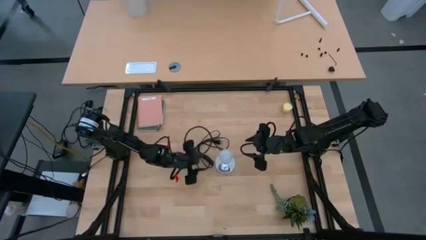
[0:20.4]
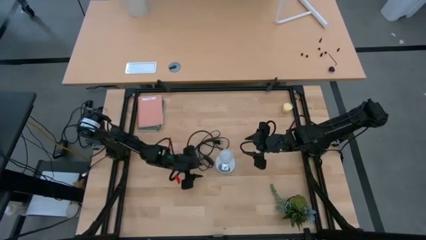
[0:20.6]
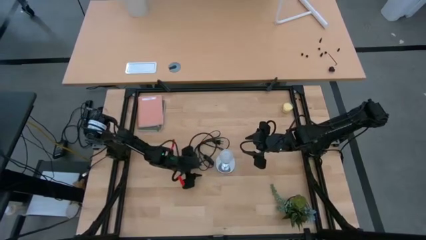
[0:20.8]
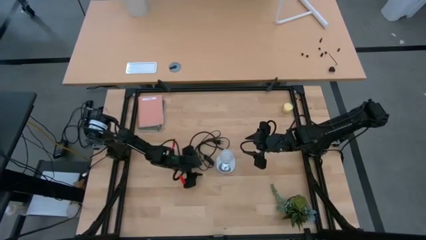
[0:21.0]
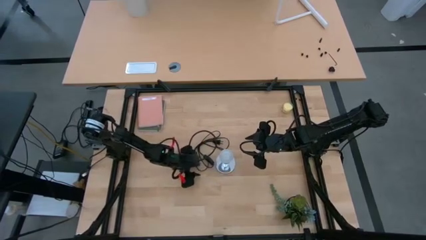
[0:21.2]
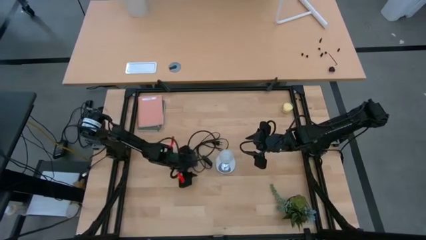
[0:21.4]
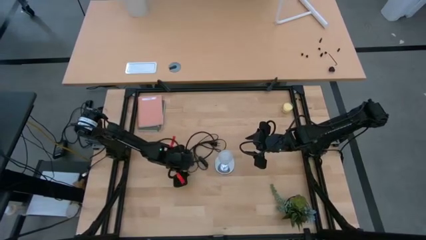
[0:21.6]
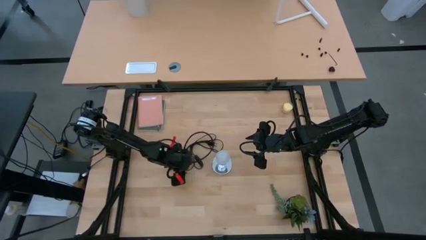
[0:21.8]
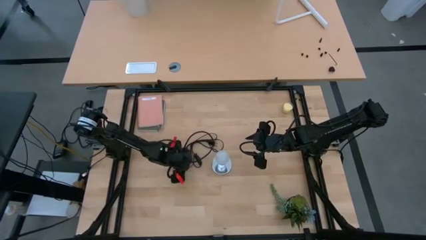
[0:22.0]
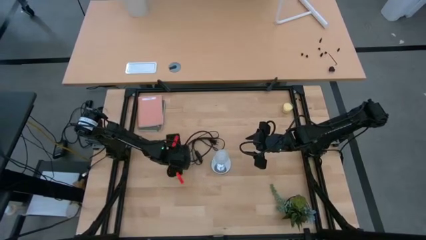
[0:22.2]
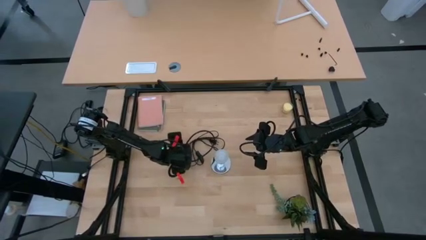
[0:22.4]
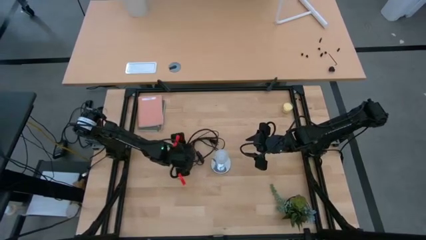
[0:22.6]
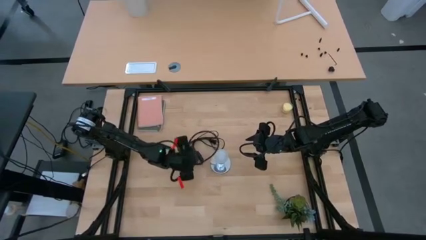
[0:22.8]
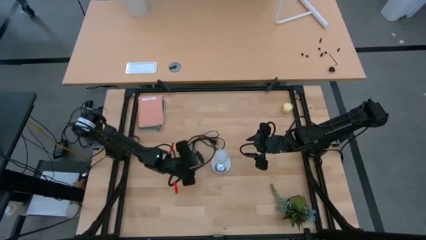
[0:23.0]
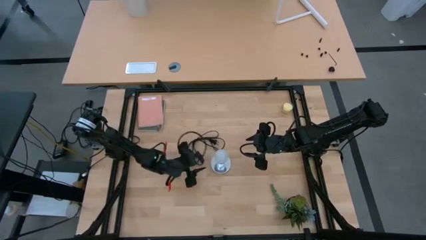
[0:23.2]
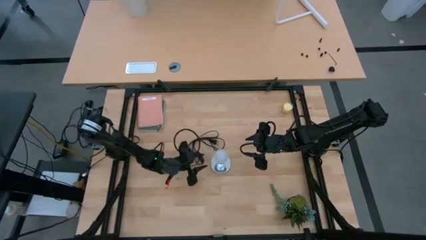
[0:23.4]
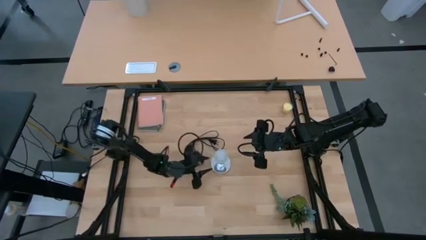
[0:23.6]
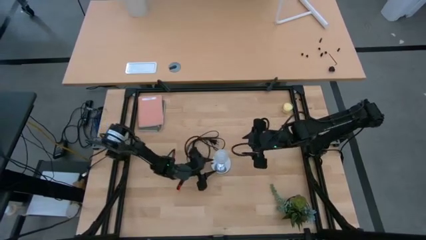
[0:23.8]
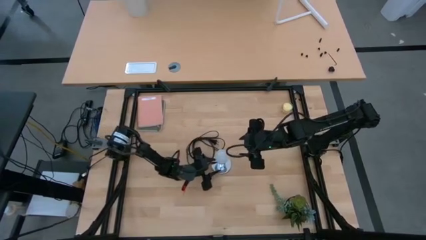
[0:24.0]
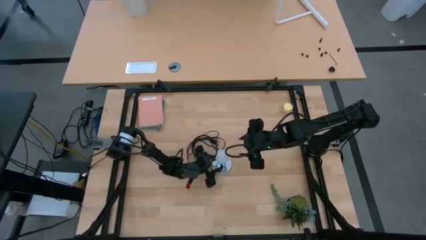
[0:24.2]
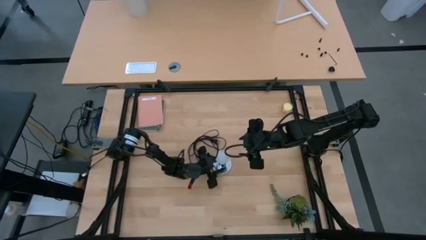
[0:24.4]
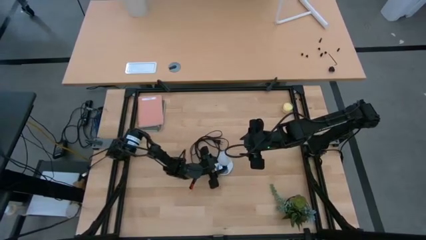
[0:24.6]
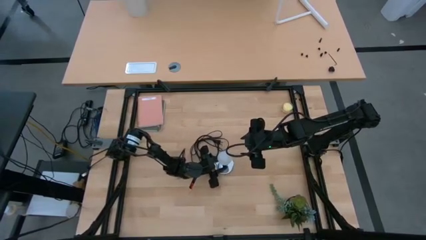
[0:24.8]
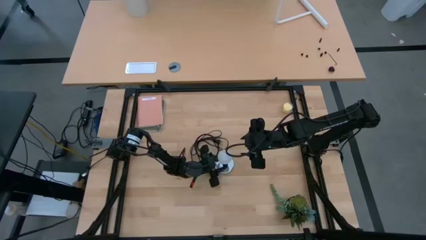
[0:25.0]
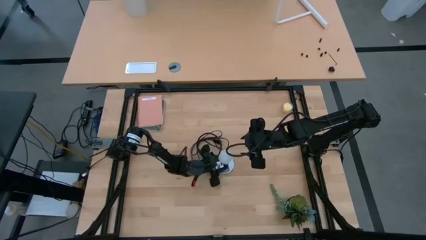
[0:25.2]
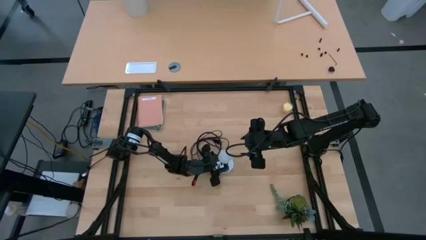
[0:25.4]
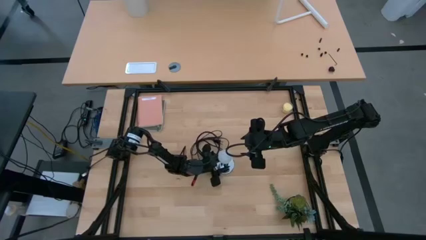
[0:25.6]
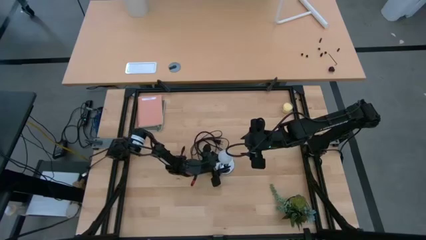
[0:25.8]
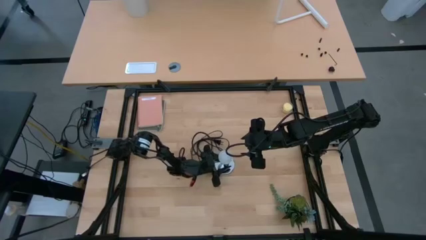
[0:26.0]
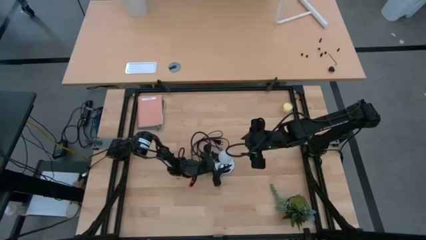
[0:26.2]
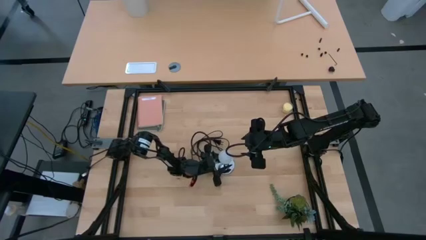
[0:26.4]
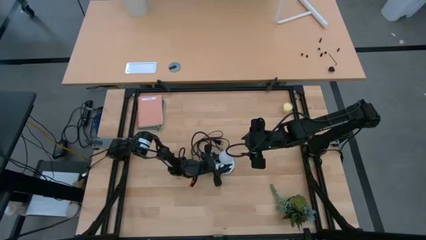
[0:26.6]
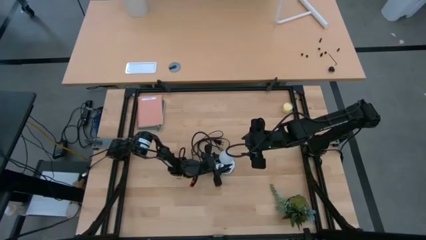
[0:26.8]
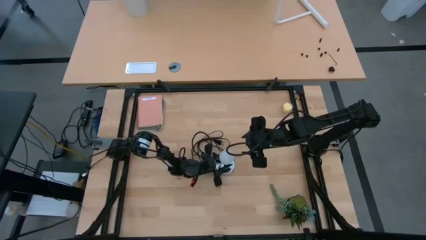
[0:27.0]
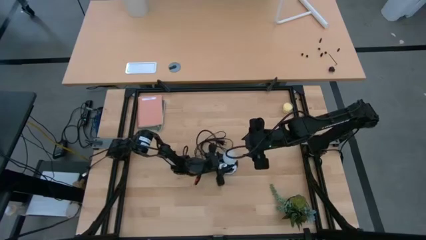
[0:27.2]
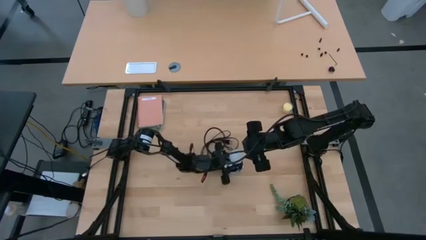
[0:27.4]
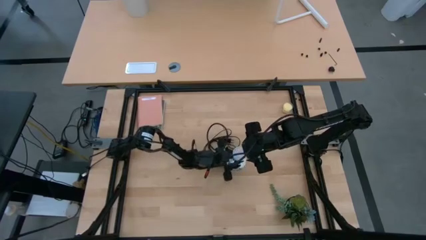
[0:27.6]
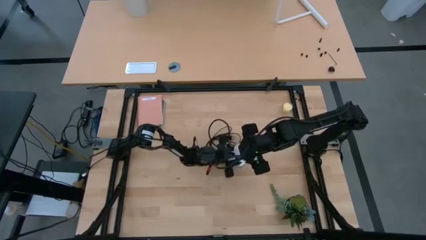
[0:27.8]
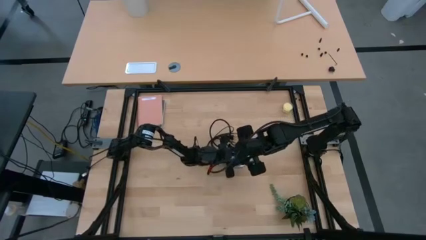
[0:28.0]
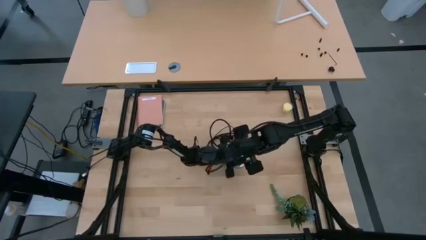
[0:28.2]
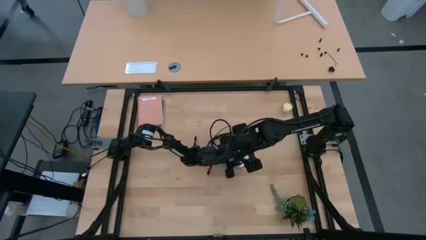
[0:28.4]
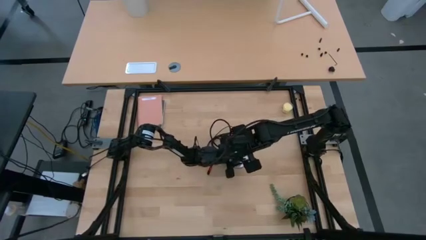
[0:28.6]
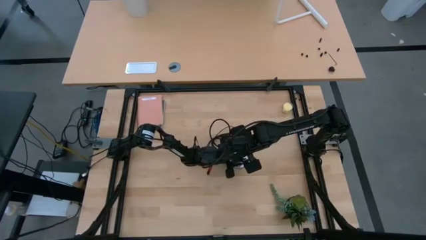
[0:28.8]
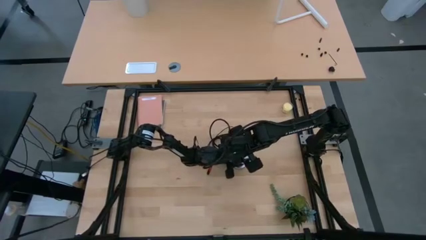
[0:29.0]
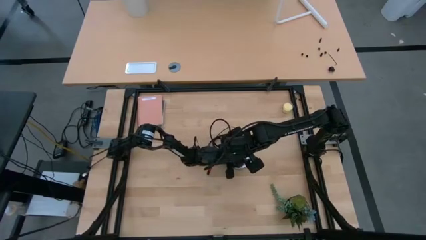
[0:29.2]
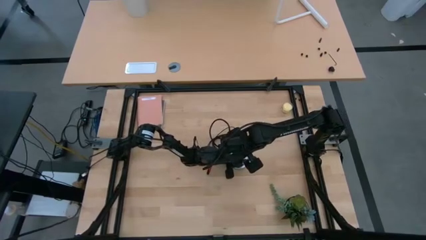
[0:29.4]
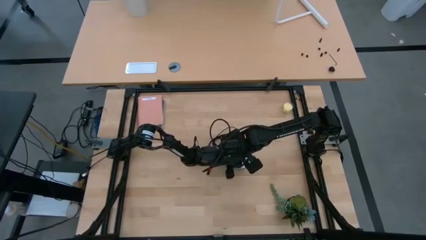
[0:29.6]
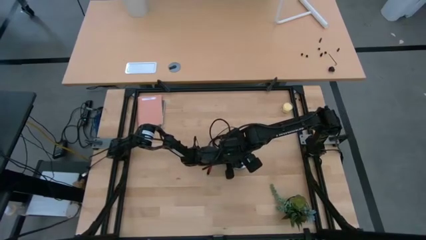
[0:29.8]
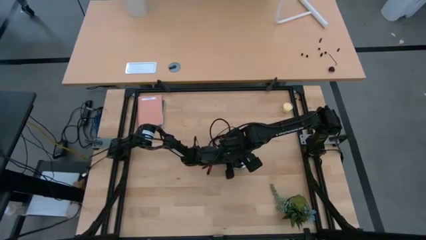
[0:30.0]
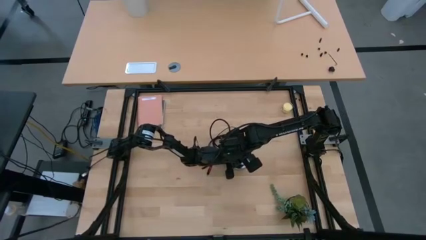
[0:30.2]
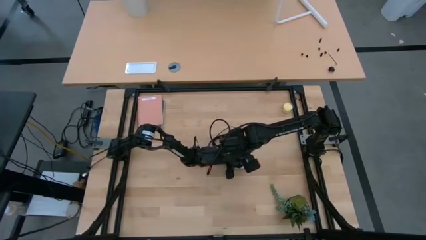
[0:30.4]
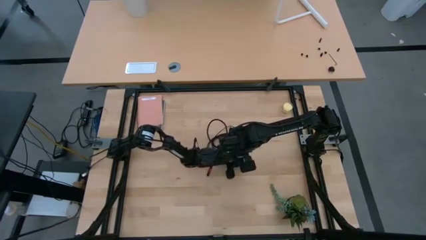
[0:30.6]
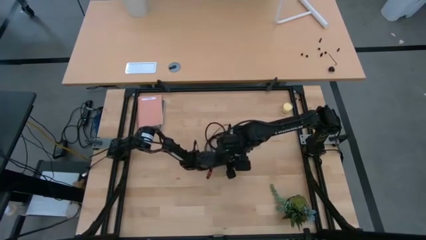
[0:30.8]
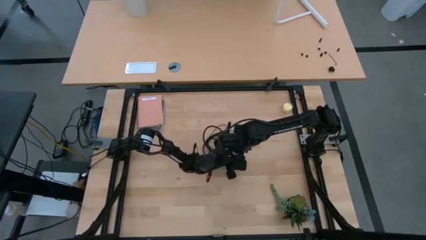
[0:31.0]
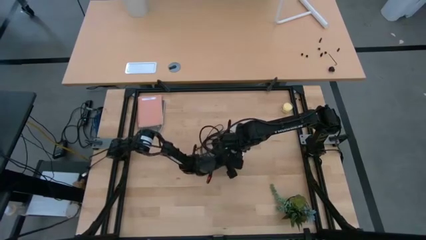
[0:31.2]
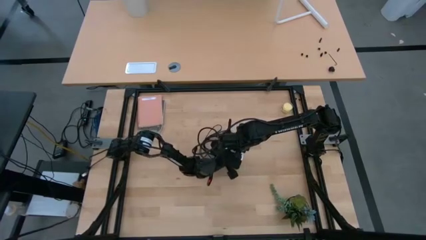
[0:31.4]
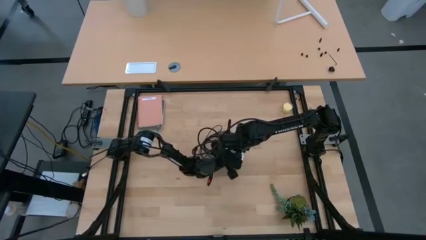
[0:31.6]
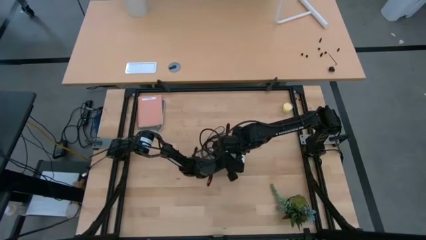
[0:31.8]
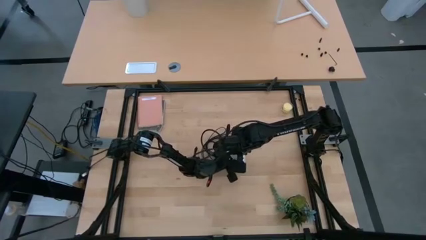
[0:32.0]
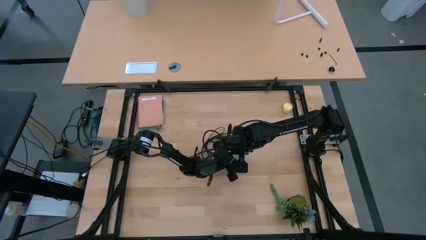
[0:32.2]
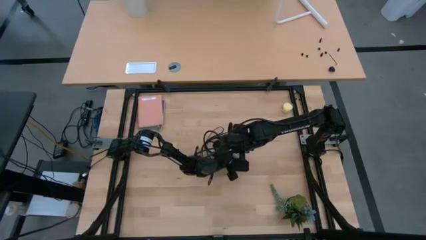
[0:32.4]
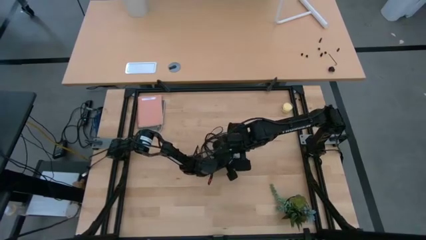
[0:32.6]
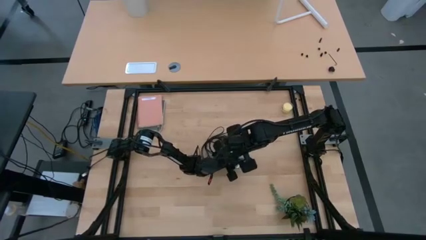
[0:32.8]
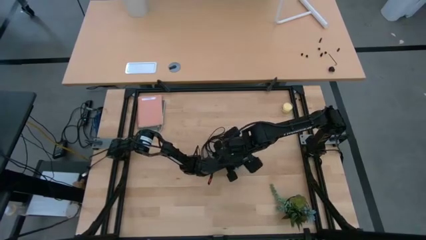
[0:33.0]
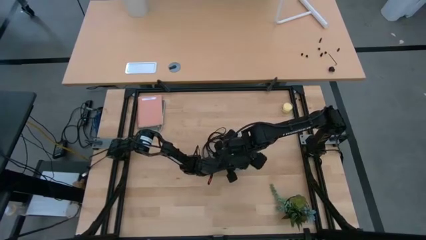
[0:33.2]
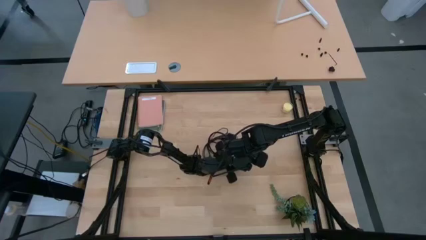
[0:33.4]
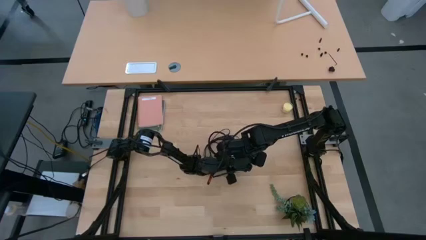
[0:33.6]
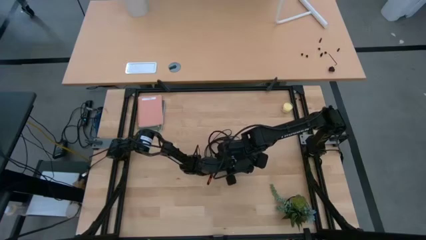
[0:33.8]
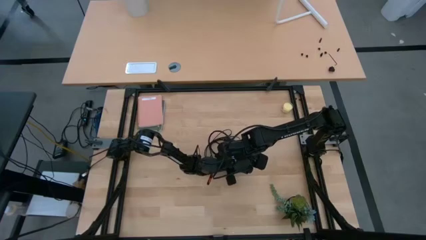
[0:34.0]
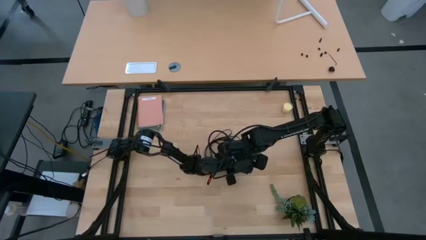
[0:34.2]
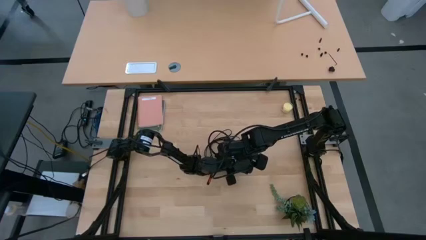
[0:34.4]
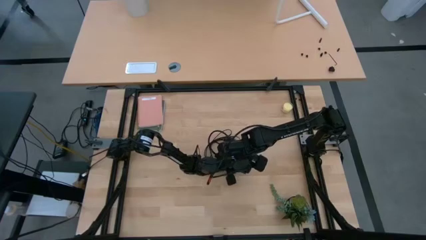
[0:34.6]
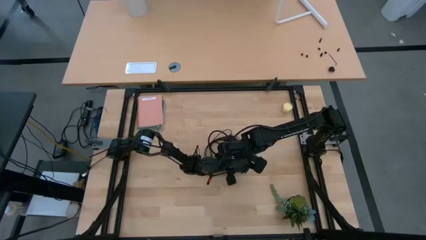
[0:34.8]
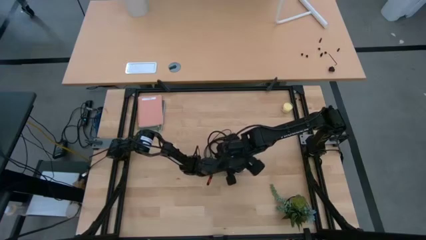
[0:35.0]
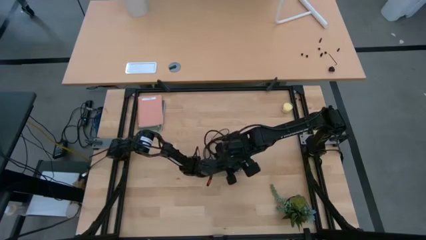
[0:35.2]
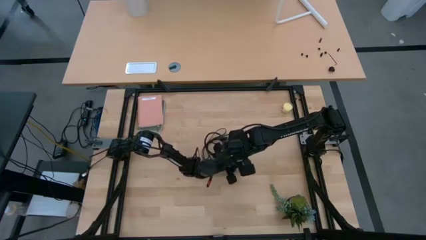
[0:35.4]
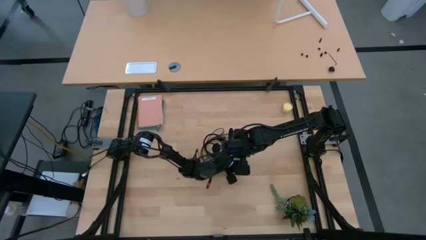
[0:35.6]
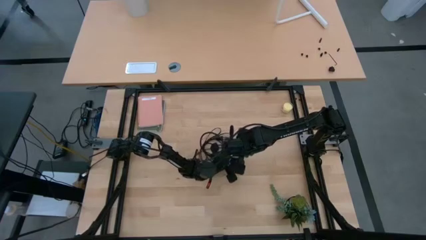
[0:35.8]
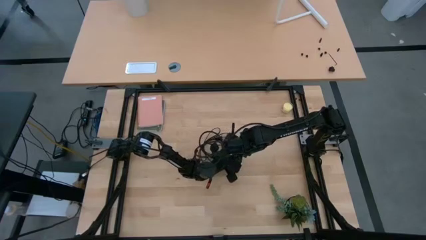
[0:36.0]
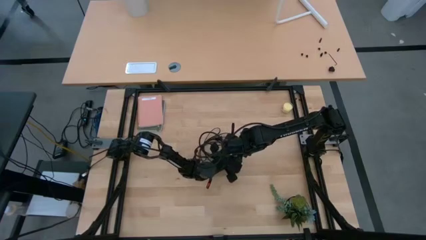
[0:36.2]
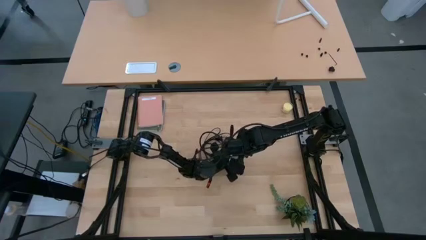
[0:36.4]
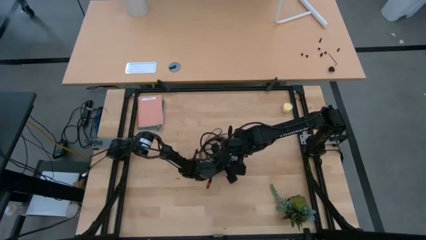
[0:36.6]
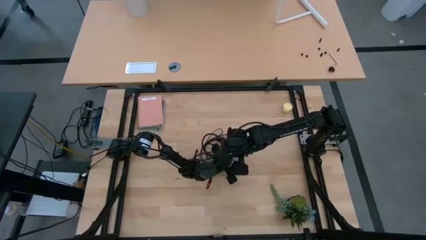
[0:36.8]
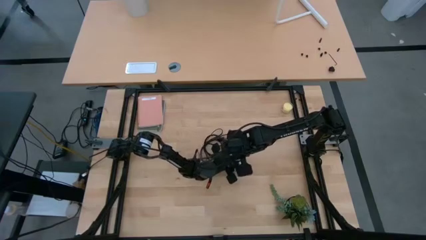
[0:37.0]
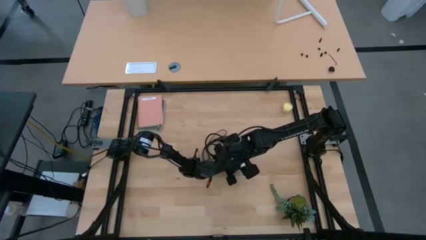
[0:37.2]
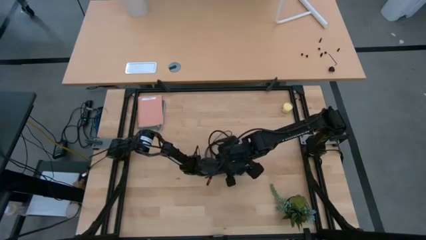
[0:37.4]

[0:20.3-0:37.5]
Task: Screw lightbulb
Insert the lightbulb into the silver lamp
